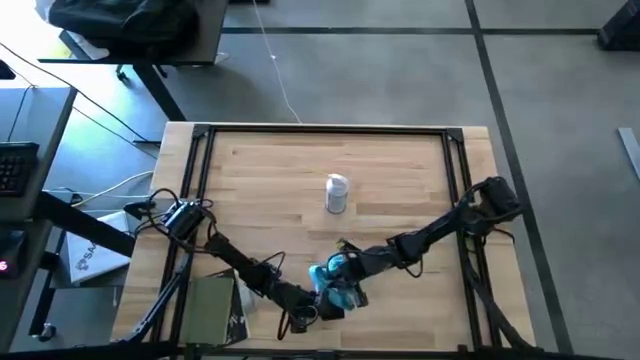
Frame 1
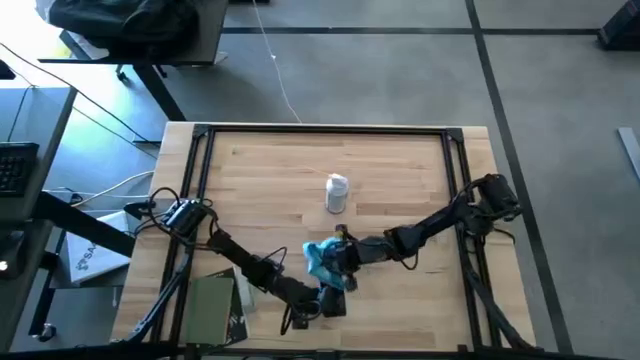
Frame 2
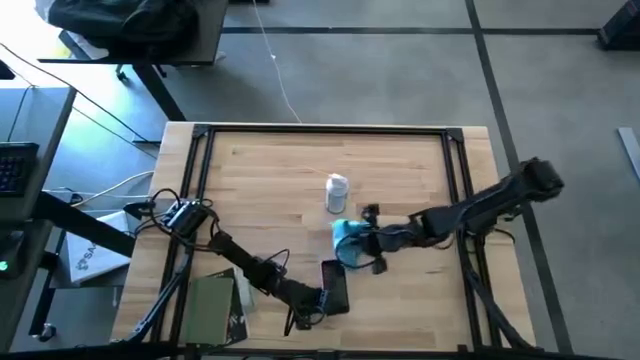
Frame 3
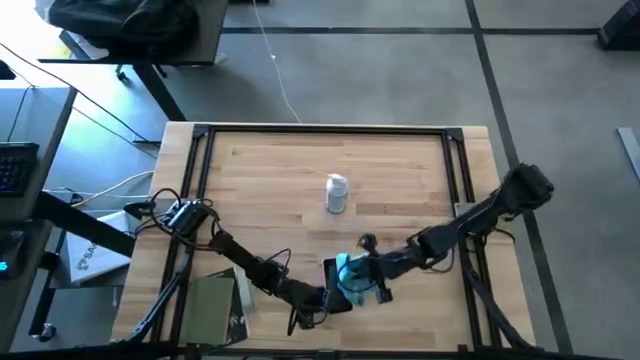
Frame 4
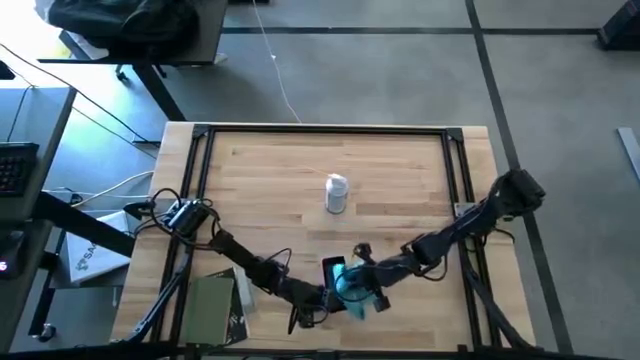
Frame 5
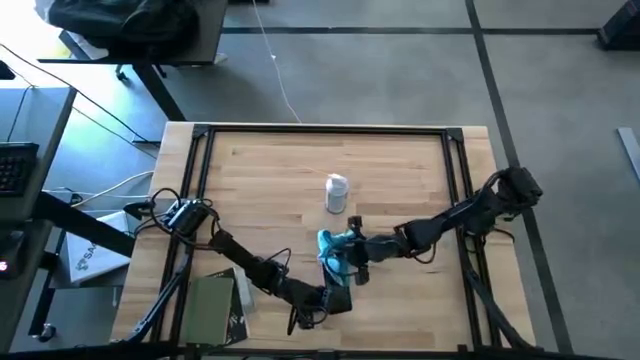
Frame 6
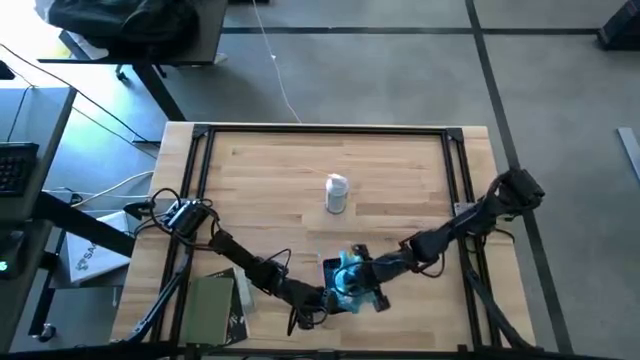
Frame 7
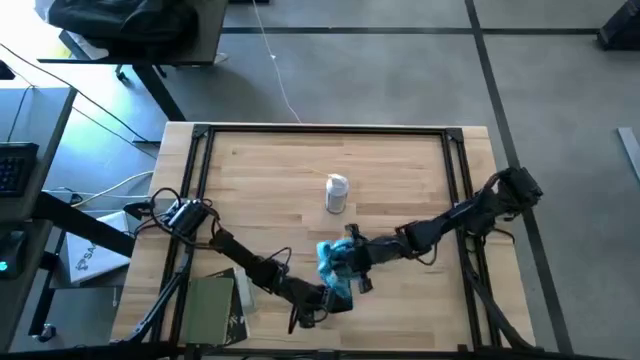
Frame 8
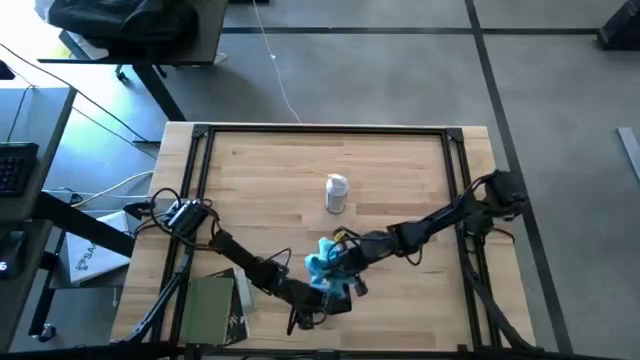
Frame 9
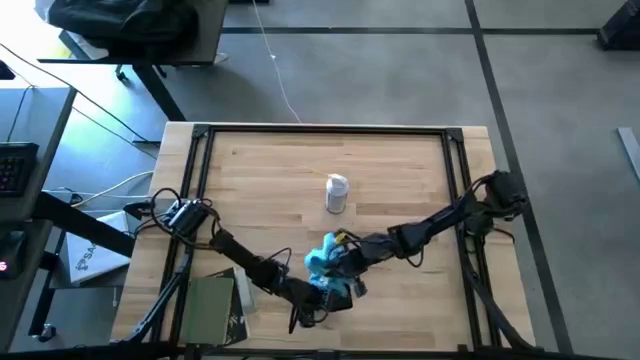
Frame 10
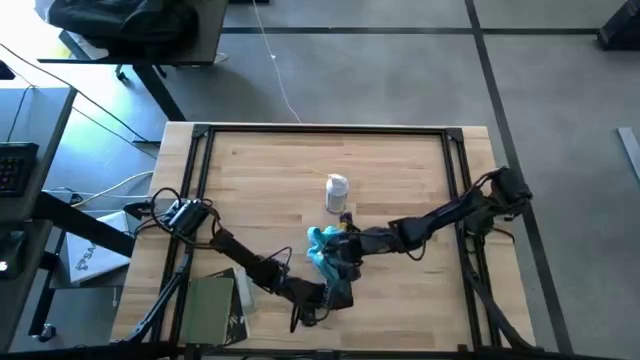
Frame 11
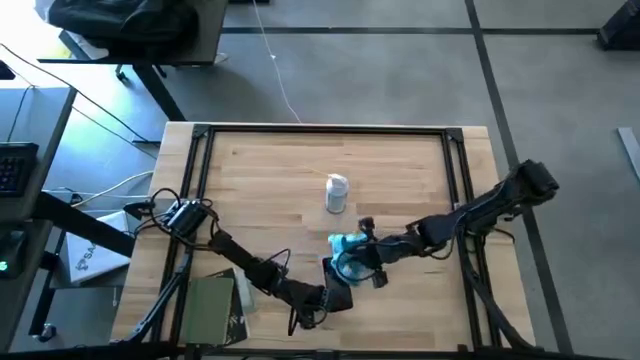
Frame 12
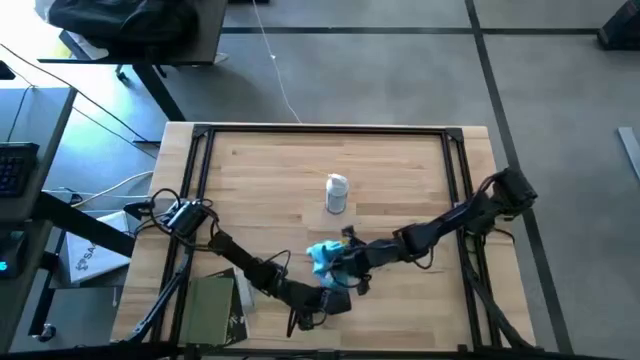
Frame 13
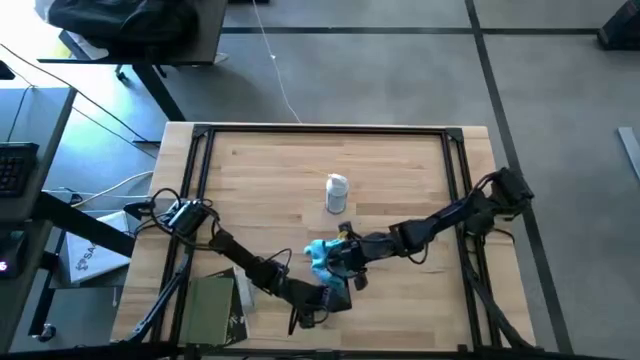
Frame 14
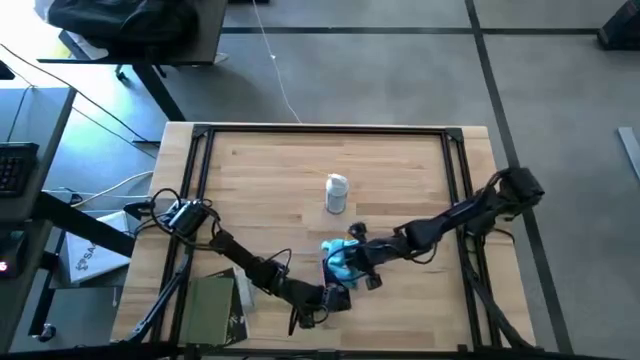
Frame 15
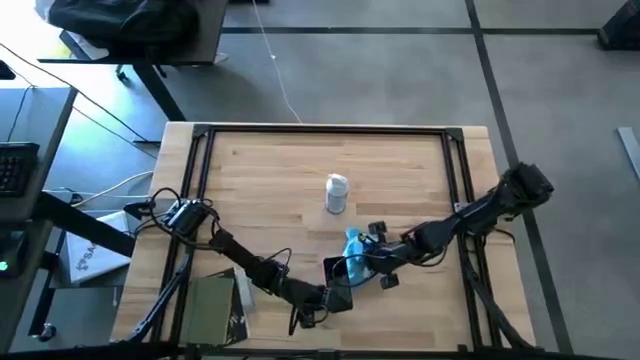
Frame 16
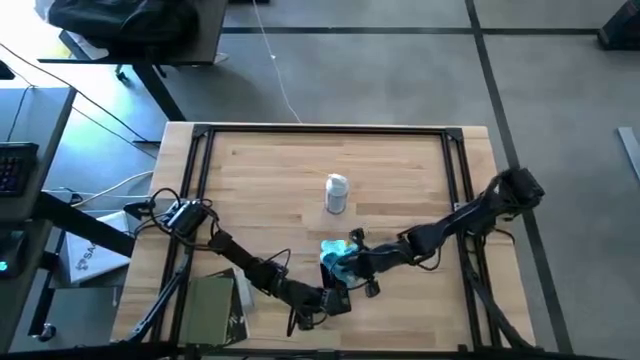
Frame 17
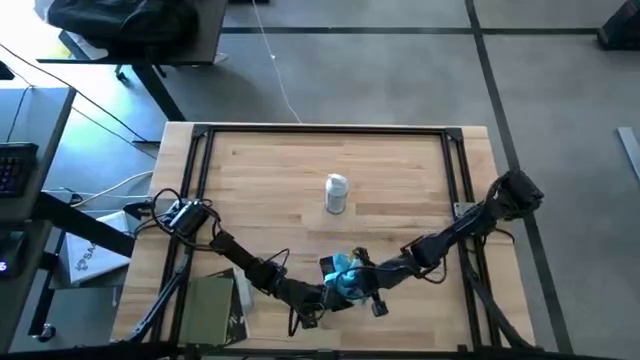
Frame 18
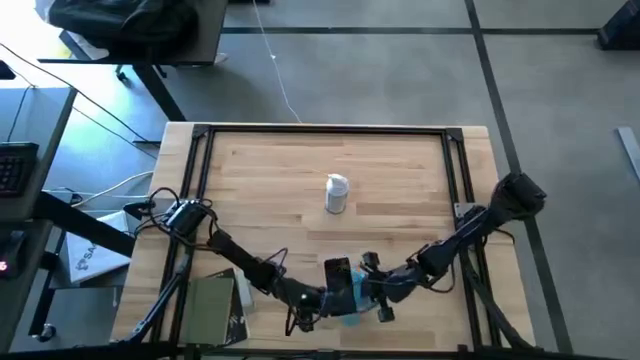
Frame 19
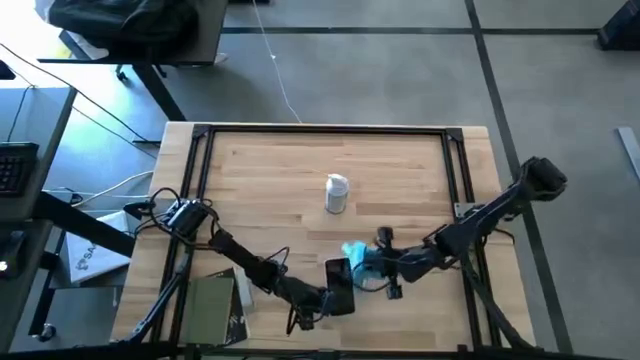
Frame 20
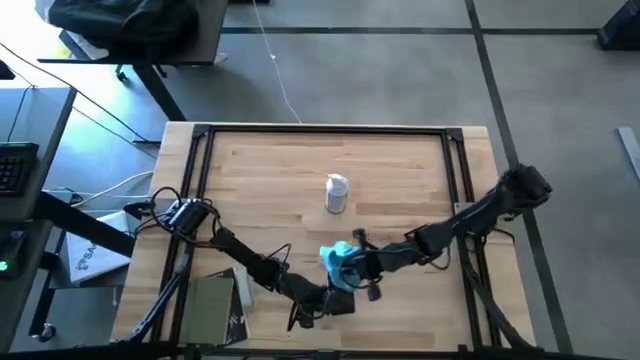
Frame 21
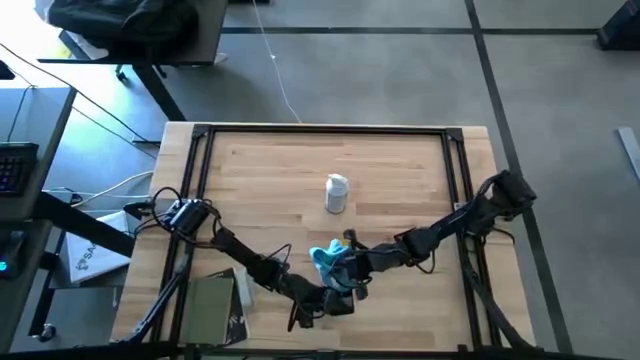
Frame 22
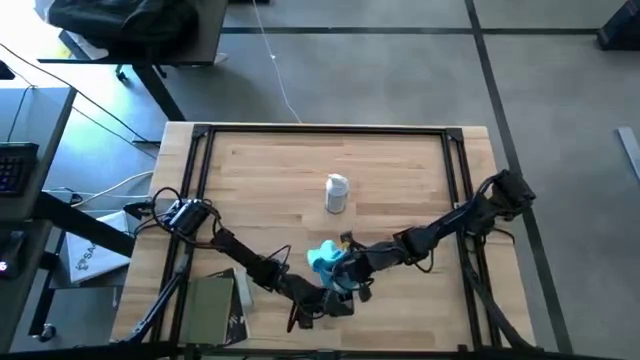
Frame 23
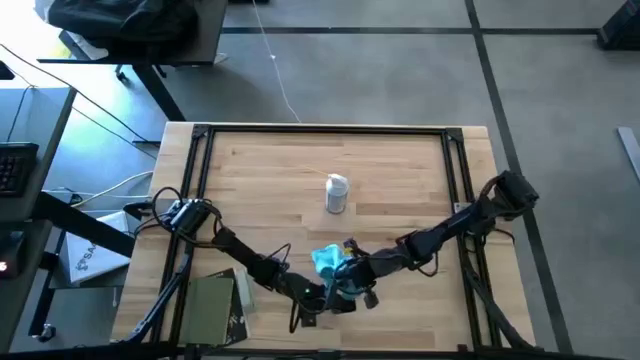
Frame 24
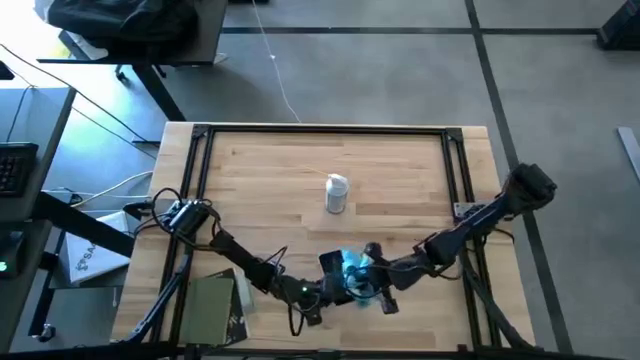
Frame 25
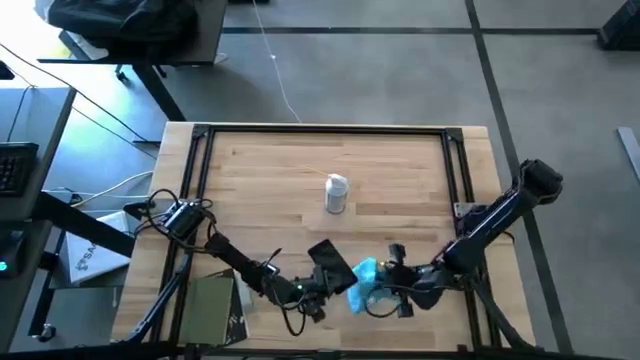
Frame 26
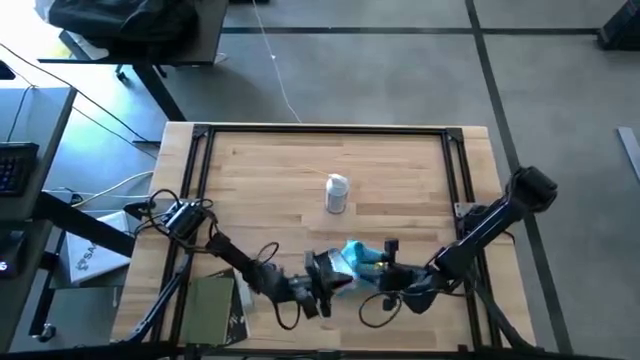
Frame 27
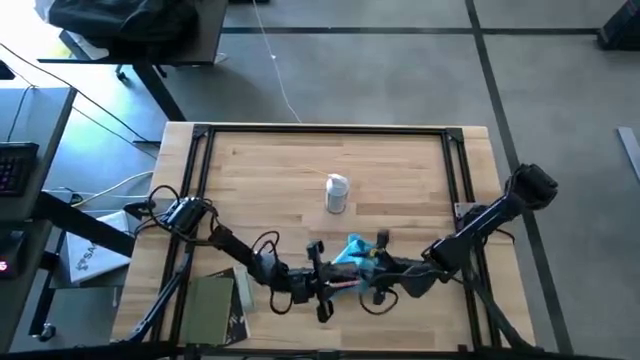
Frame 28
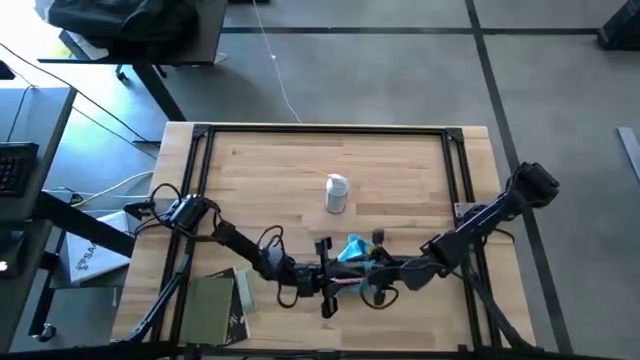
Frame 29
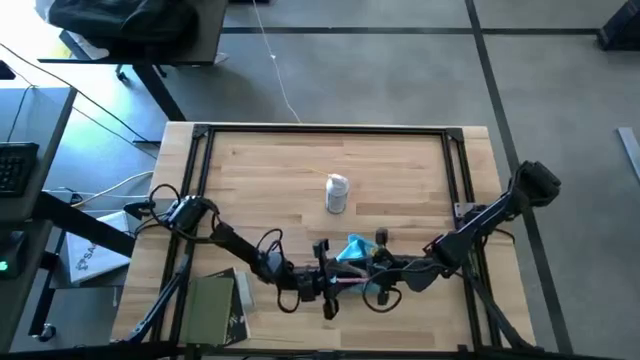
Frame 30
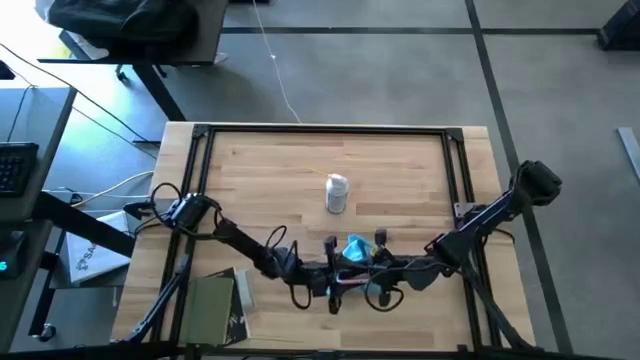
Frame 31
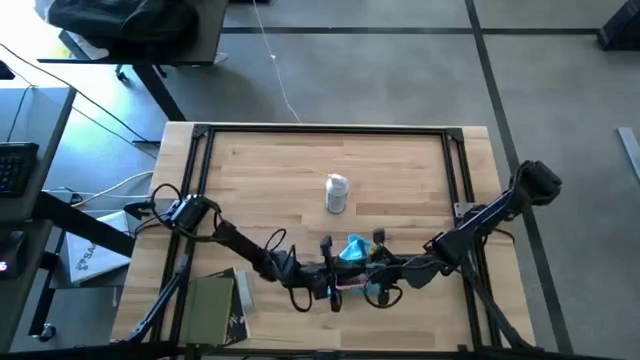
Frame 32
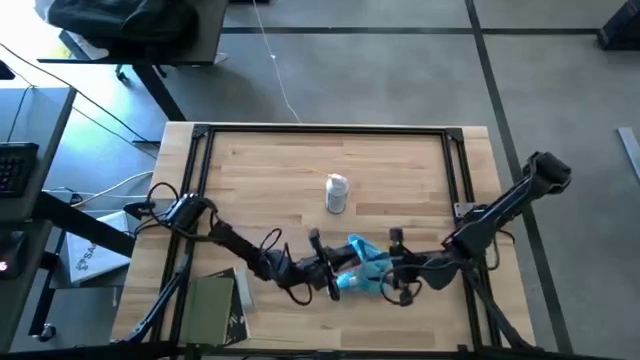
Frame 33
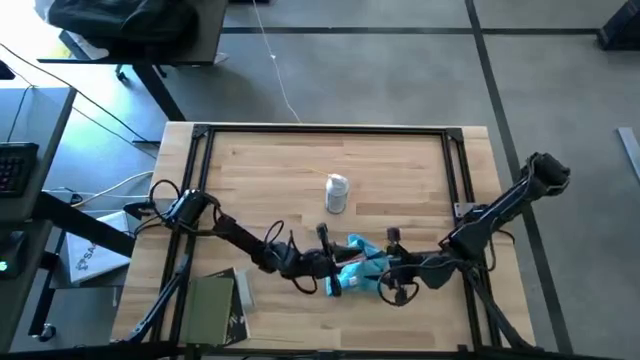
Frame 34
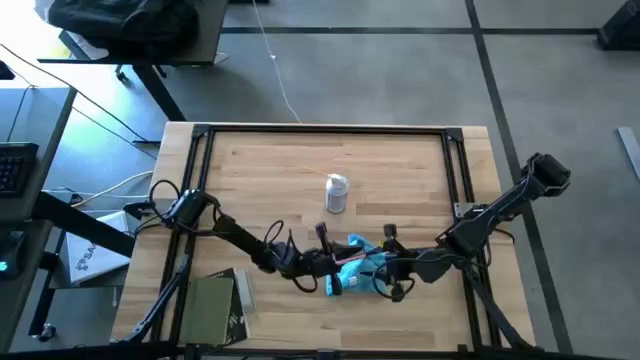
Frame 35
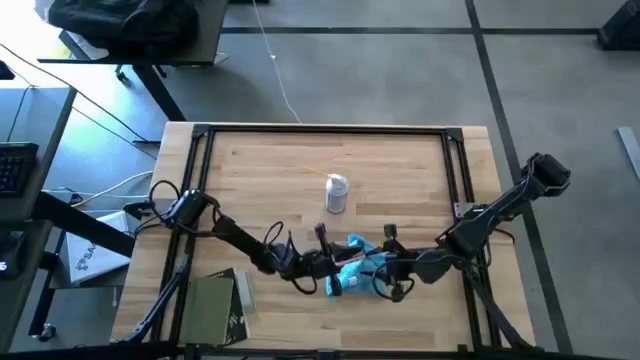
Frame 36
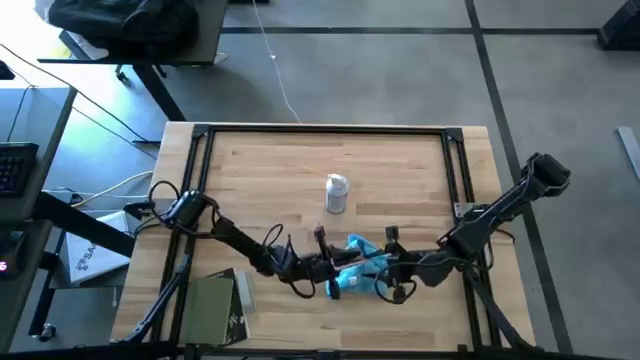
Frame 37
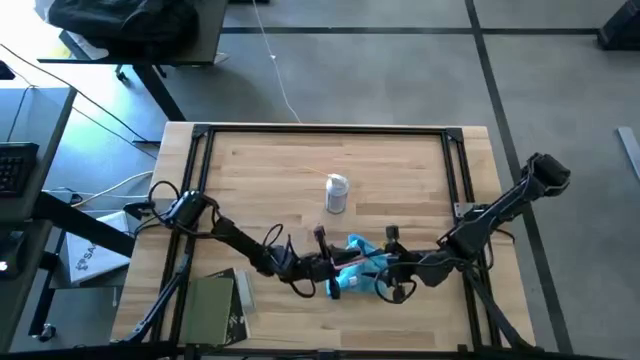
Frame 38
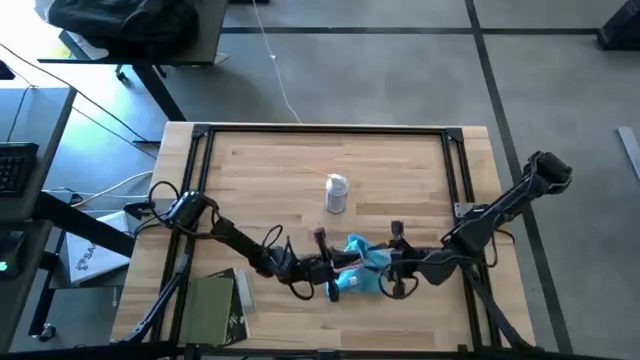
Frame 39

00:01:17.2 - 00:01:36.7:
Task: Apply microfiber cloth
Wipe the pink cellphone with a blue microfiber cloth
